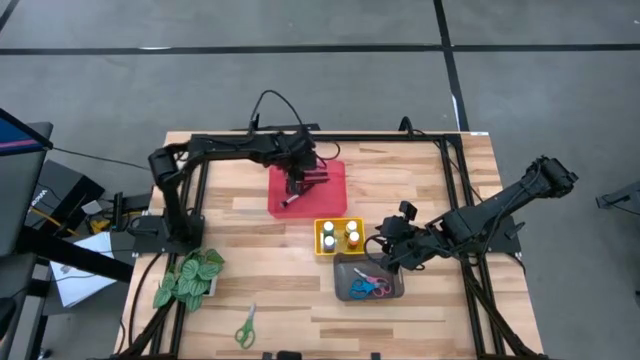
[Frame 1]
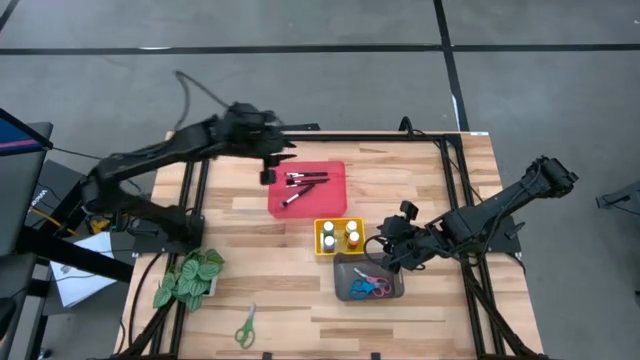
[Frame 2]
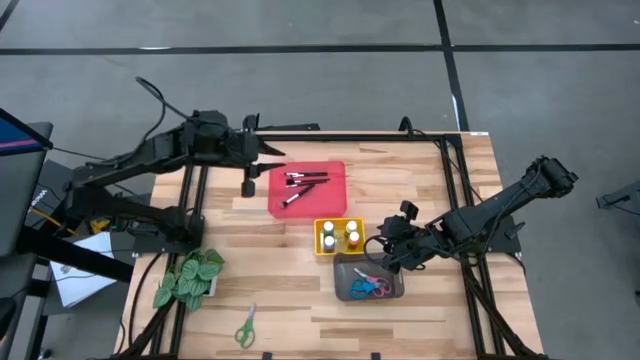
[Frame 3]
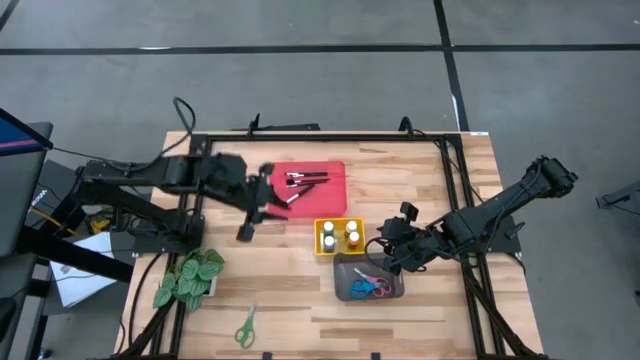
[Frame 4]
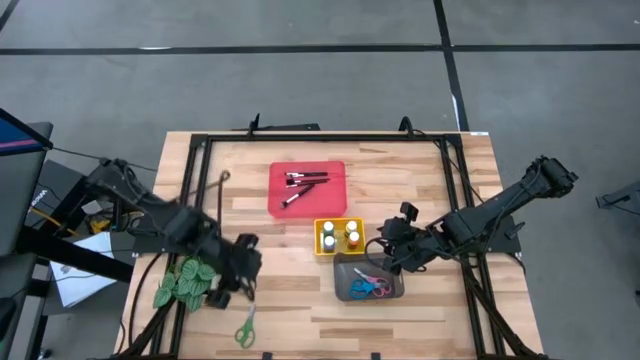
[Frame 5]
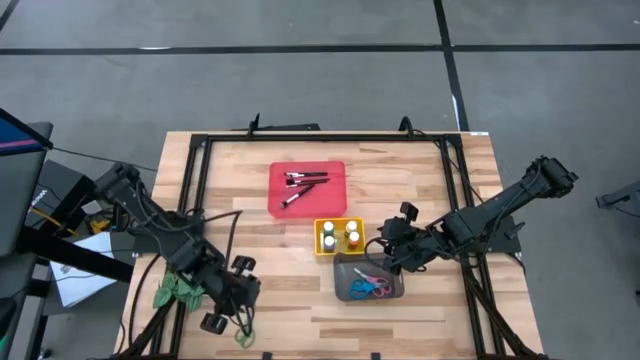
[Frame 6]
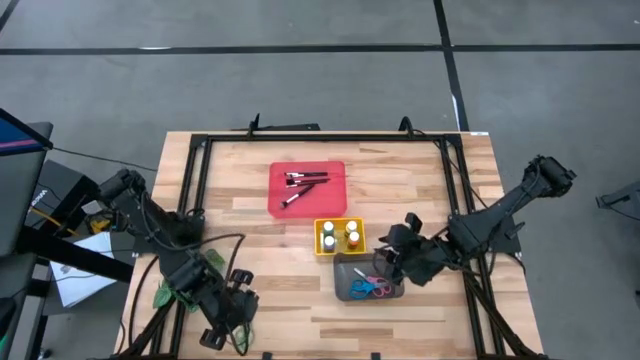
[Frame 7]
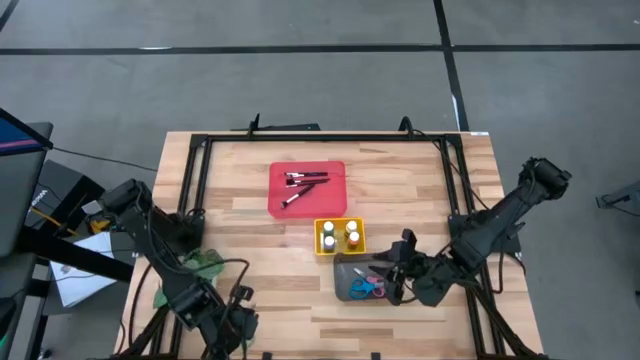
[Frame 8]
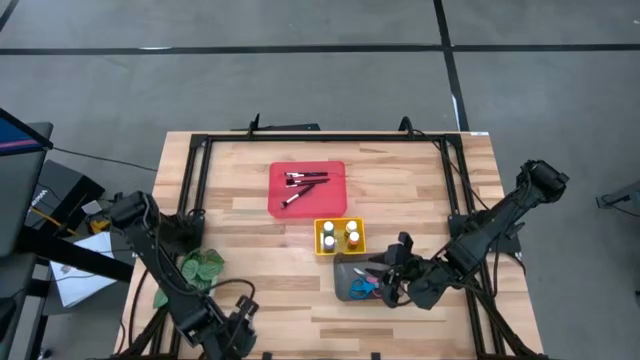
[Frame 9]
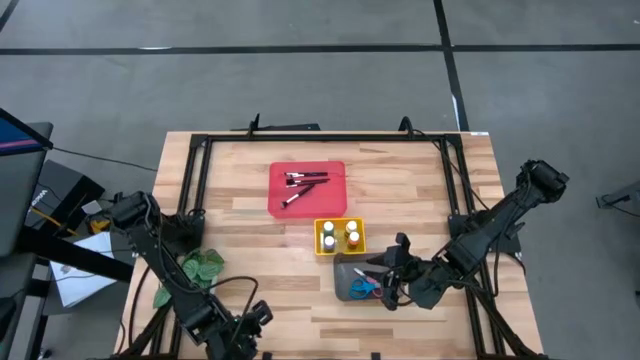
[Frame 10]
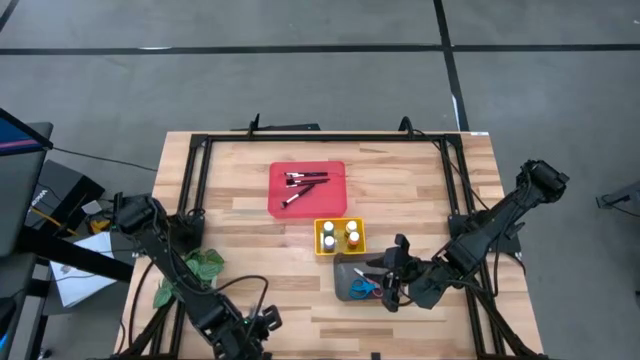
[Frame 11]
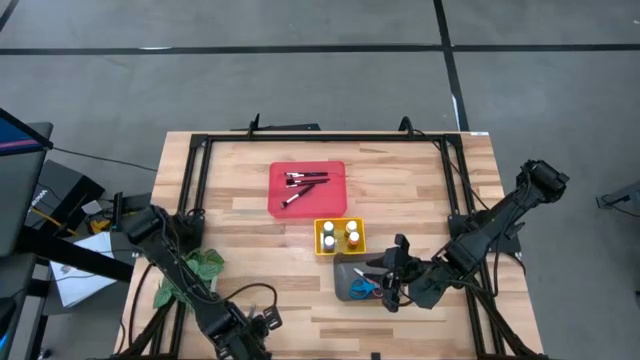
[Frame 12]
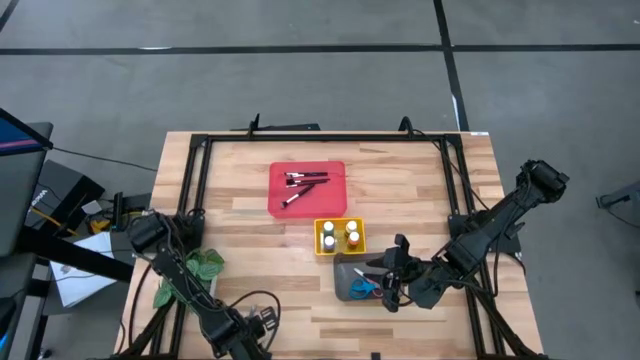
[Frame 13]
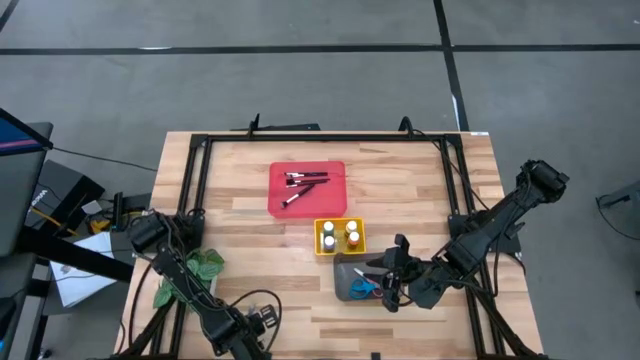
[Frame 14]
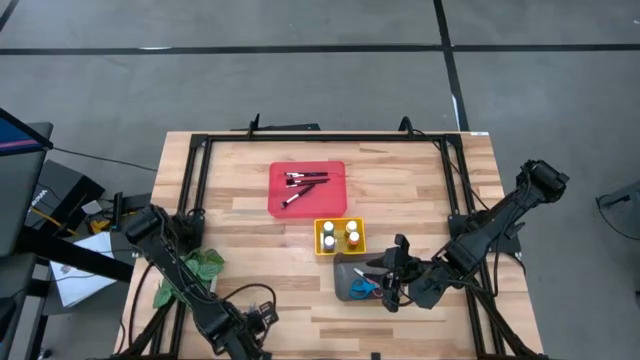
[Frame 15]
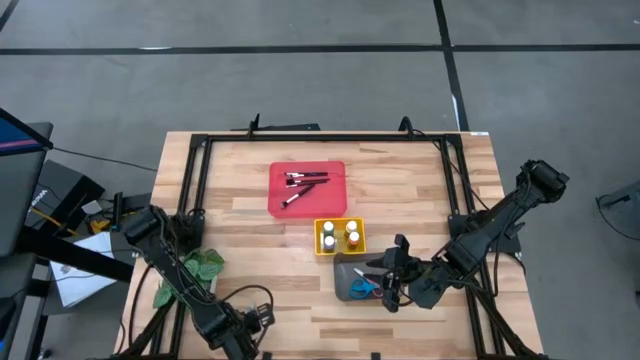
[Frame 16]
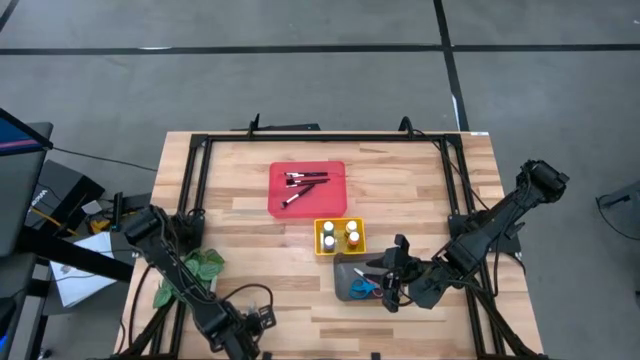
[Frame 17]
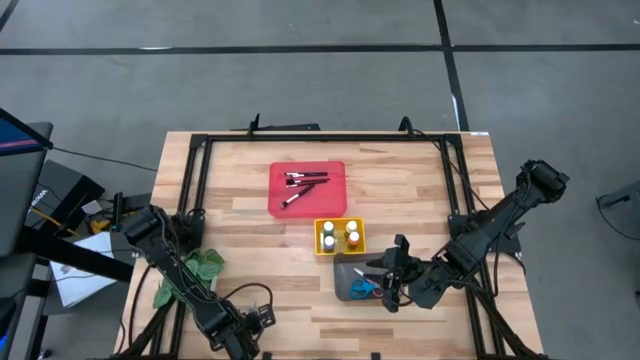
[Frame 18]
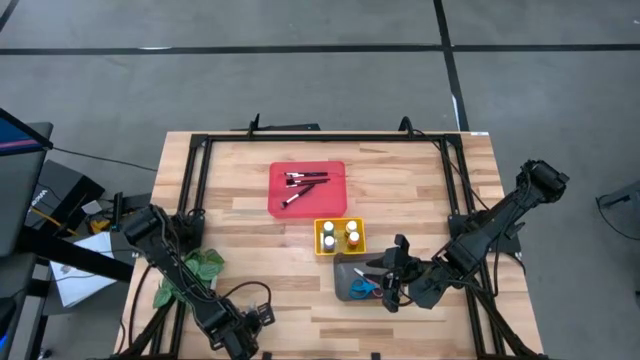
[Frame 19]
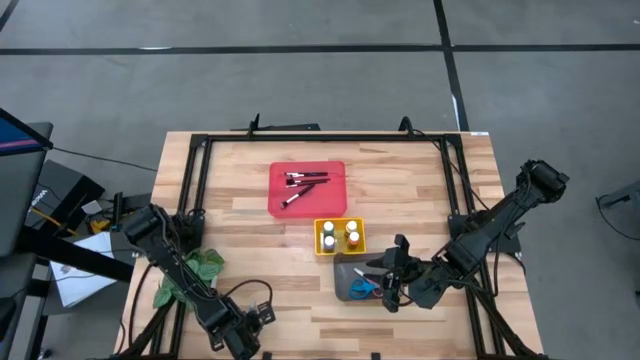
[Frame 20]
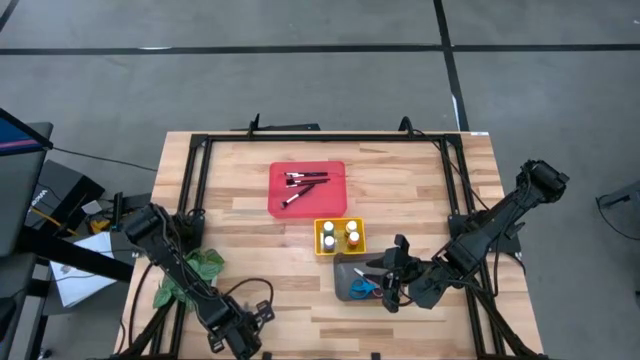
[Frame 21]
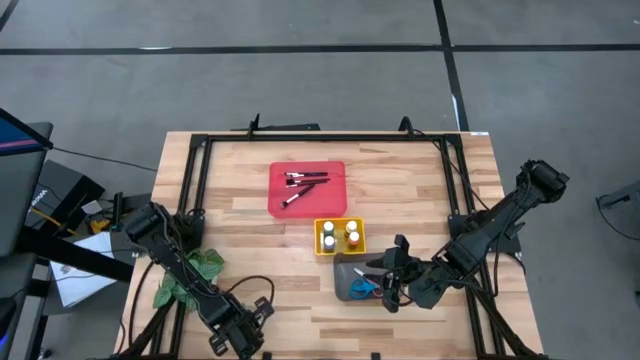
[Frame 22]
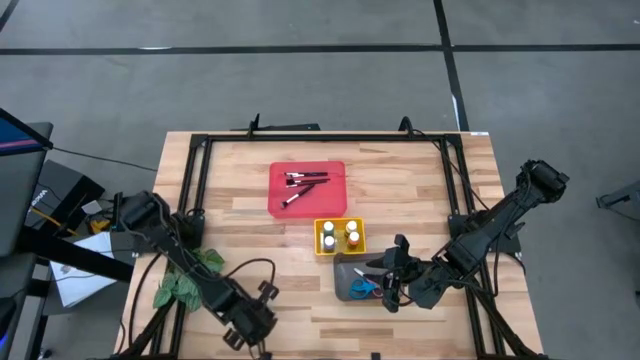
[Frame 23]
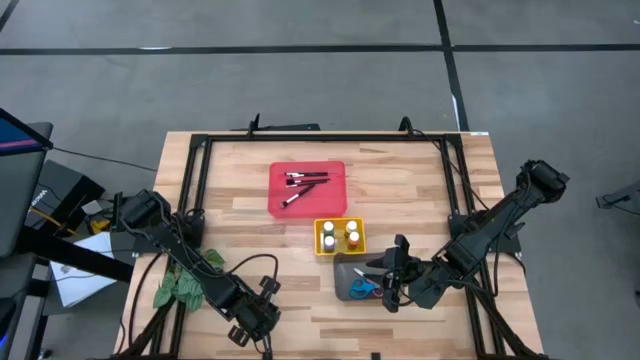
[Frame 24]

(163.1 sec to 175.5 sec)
Task: Pick & Place Paint Supplies
Put the green scissors into the black bin

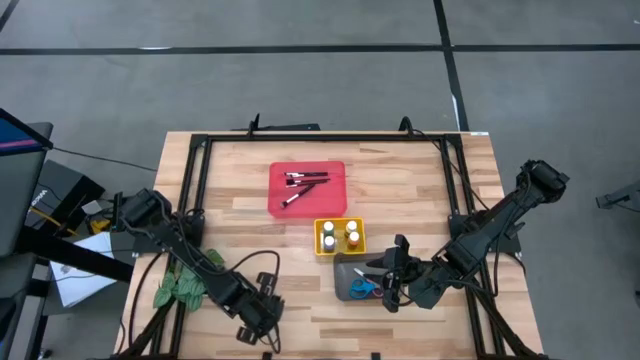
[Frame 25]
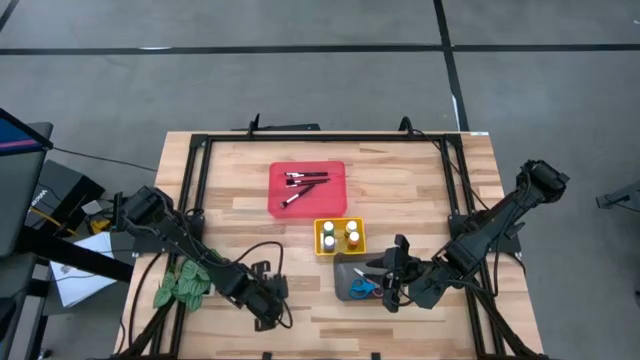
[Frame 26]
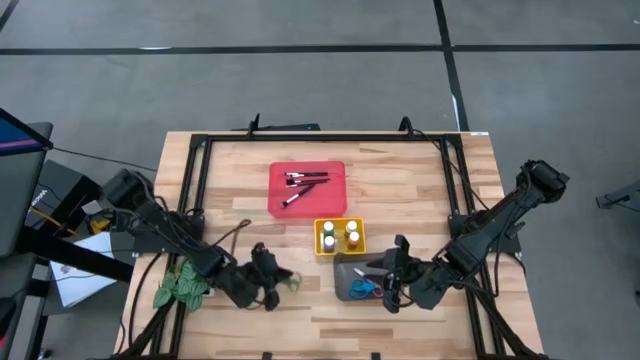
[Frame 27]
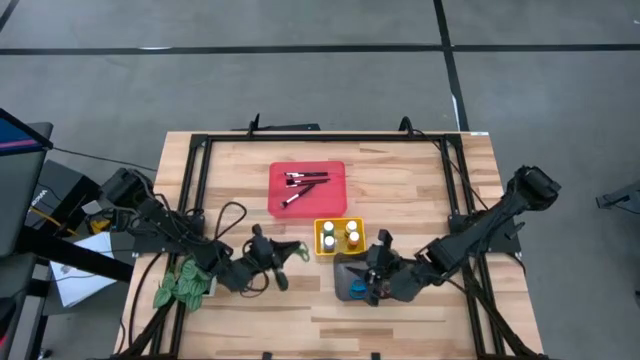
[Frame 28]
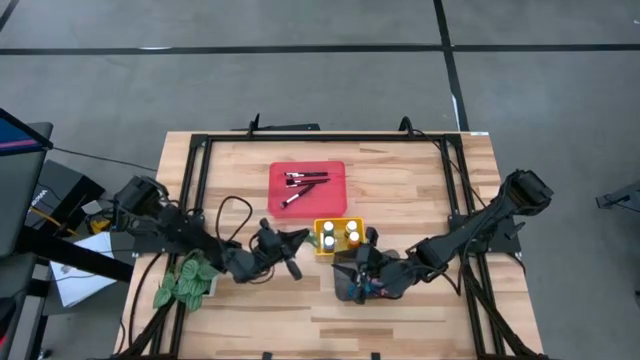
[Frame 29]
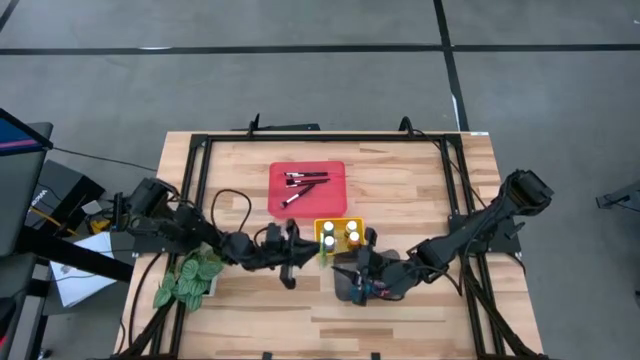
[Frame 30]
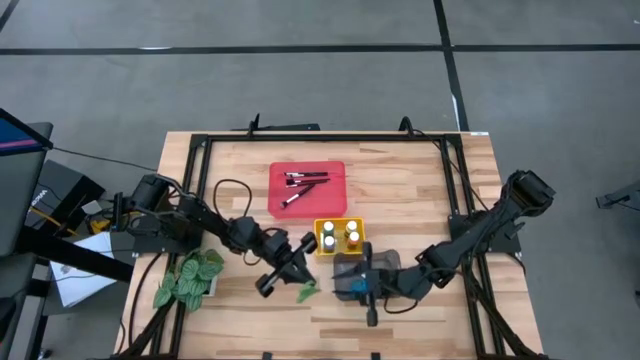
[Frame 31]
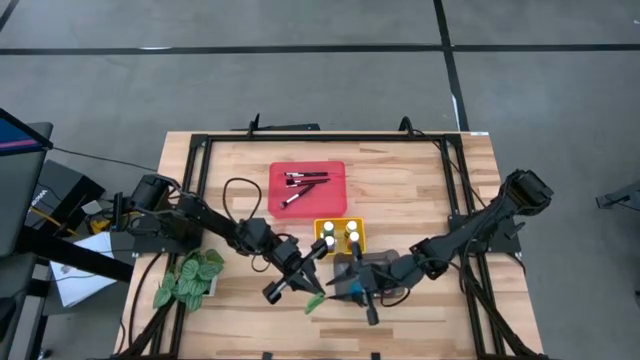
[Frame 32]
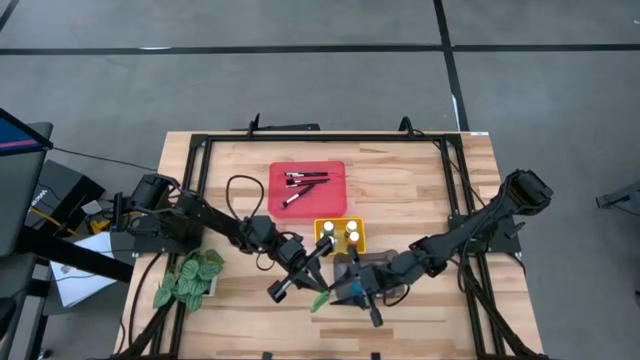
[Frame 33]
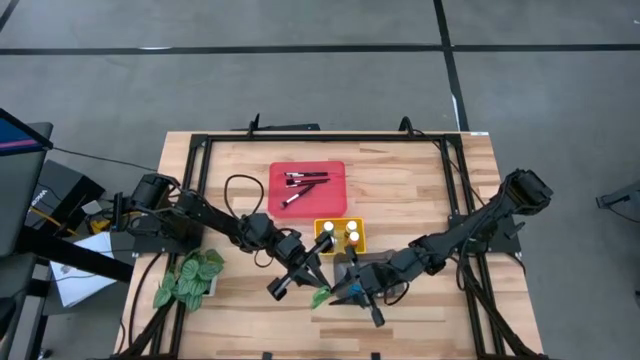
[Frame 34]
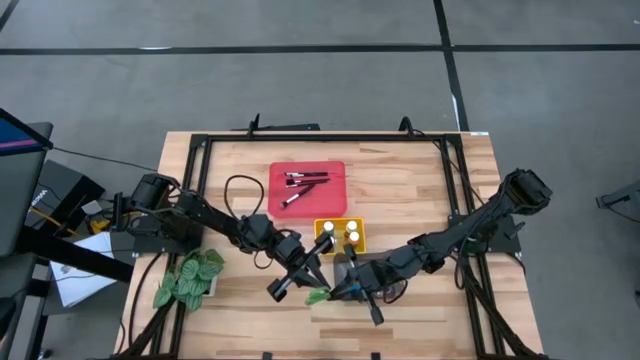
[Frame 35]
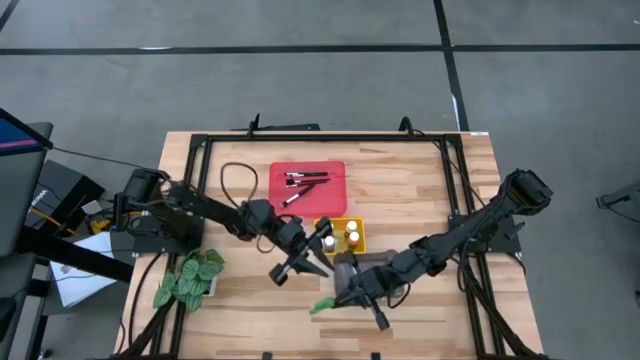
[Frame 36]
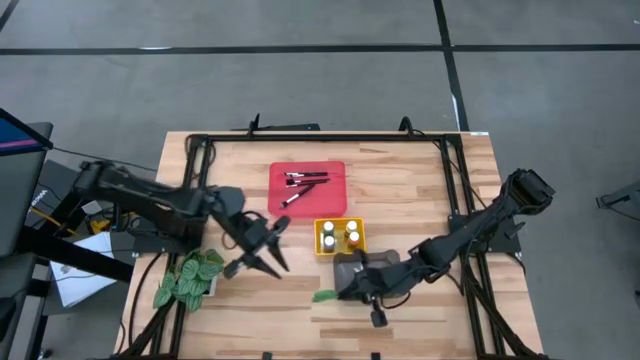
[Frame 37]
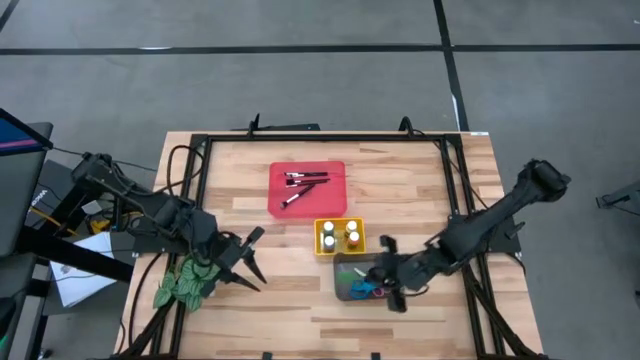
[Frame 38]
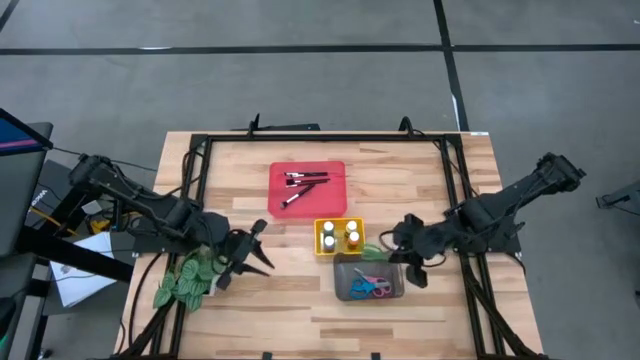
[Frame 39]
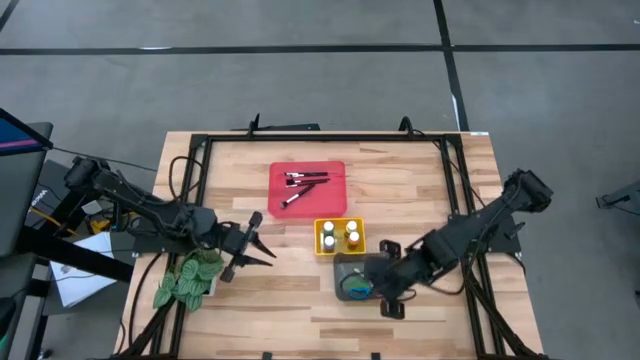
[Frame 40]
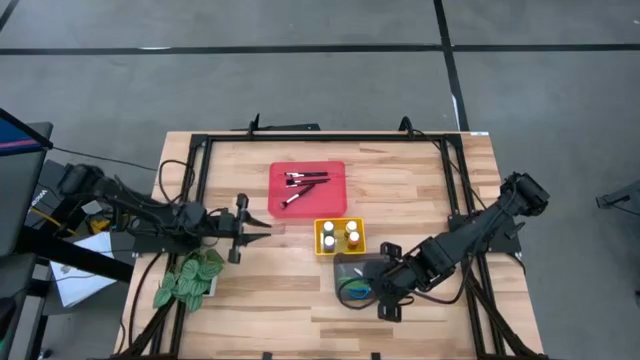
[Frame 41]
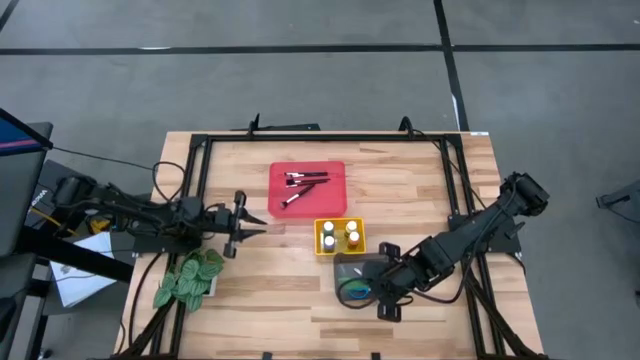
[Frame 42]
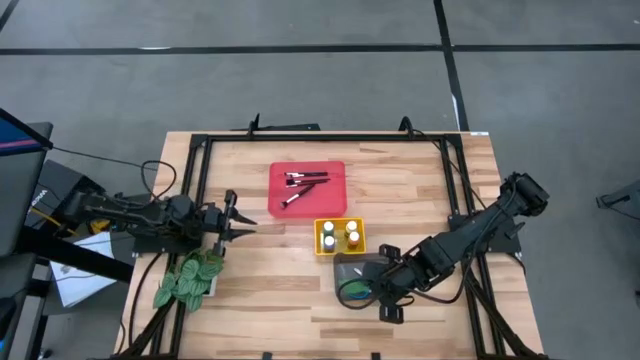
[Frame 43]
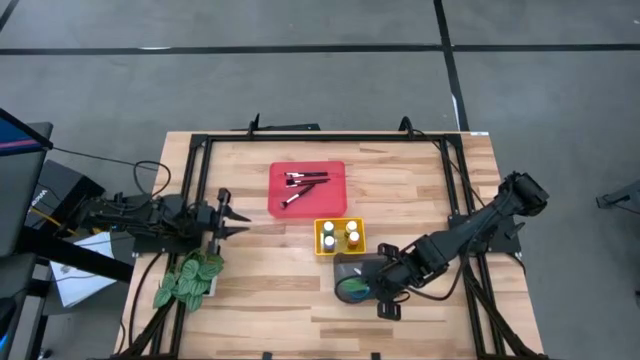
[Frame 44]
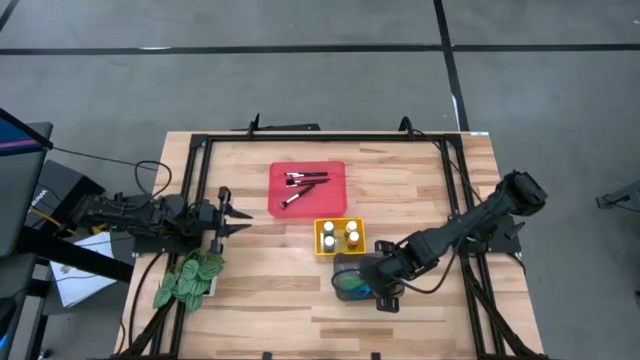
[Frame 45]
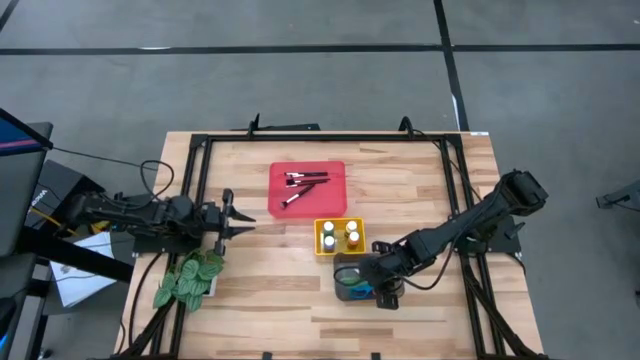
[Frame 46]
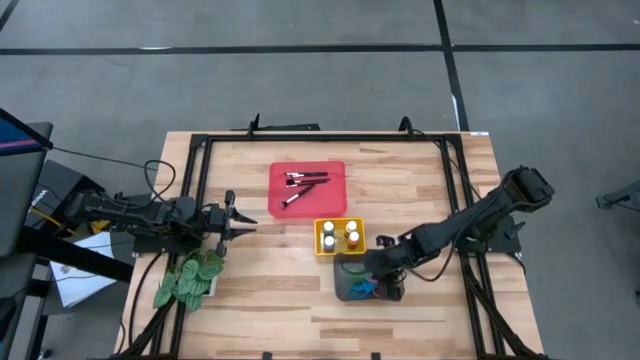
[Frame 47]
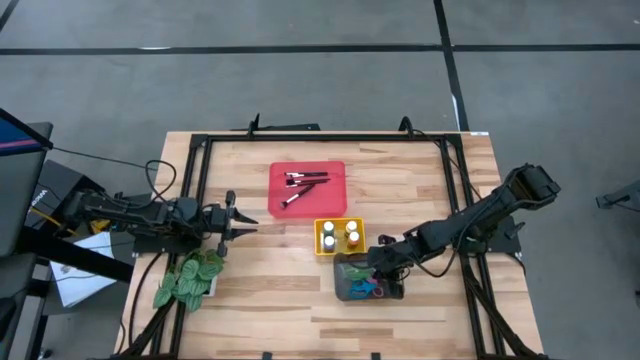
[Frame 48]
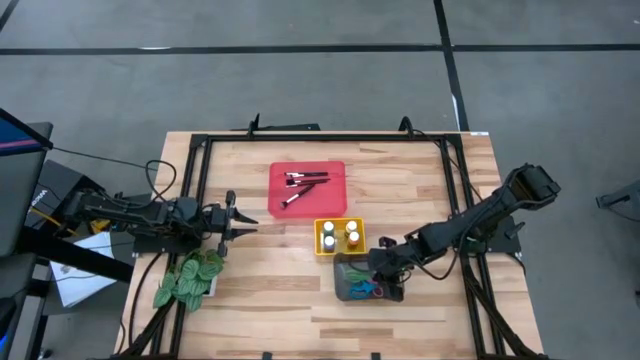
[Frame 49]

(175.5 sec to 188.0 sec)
Put the green scissors into the black bin
